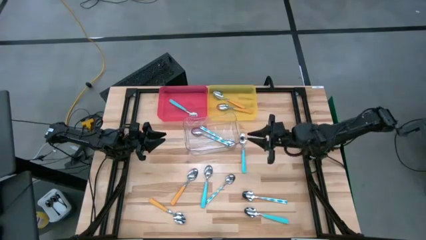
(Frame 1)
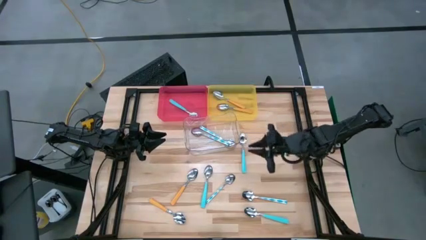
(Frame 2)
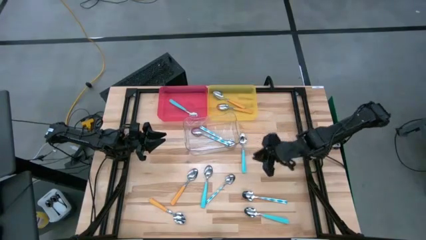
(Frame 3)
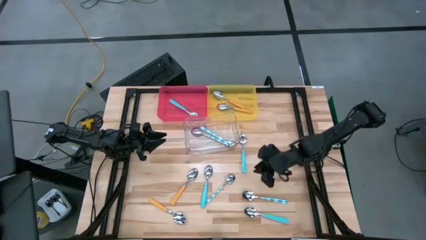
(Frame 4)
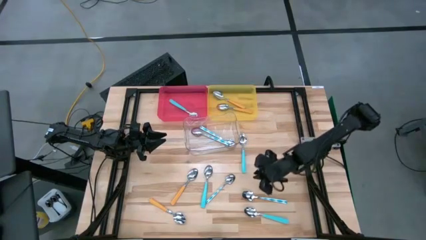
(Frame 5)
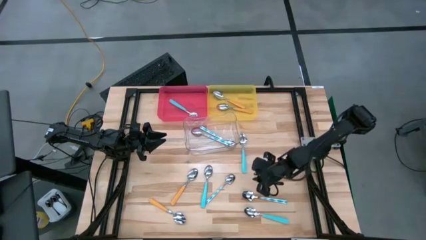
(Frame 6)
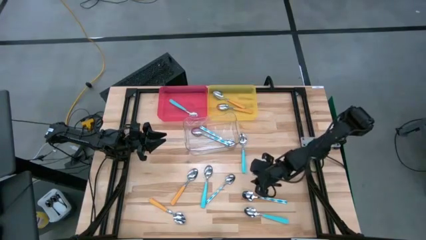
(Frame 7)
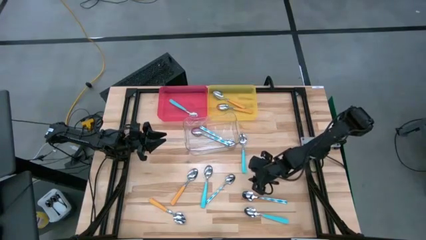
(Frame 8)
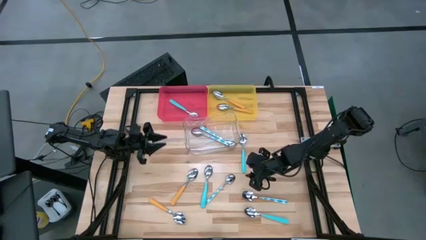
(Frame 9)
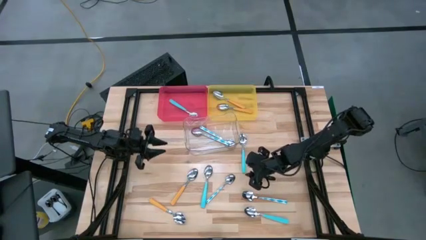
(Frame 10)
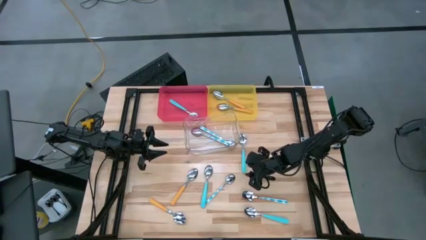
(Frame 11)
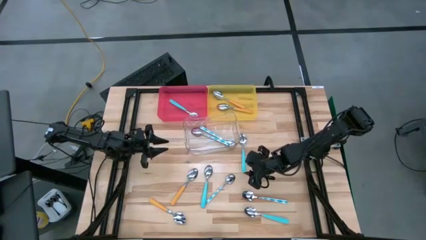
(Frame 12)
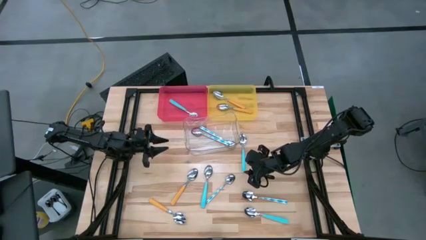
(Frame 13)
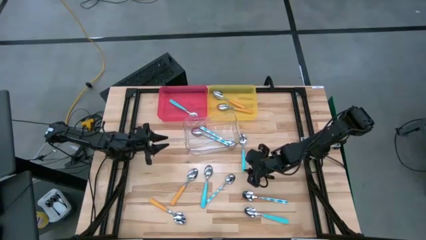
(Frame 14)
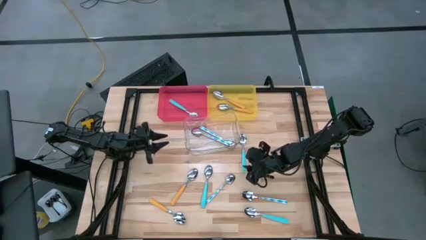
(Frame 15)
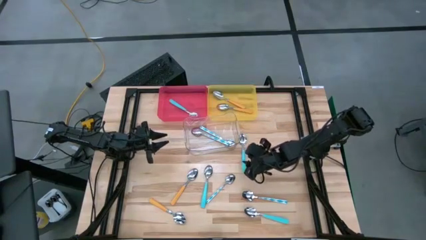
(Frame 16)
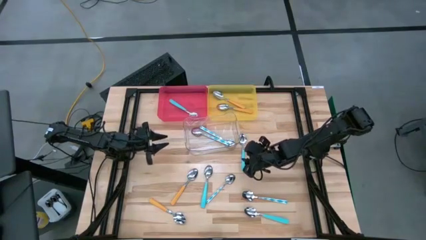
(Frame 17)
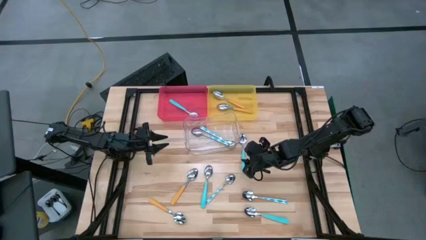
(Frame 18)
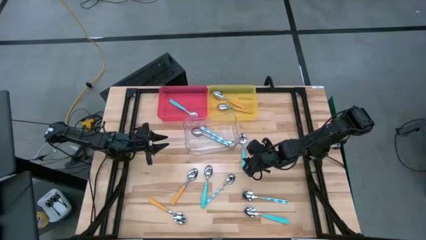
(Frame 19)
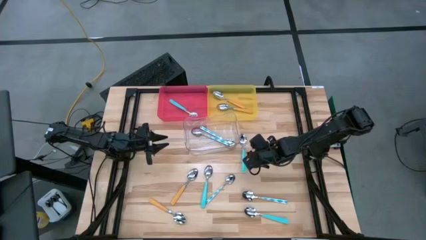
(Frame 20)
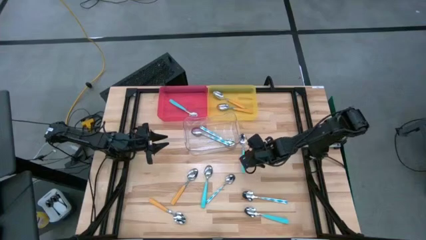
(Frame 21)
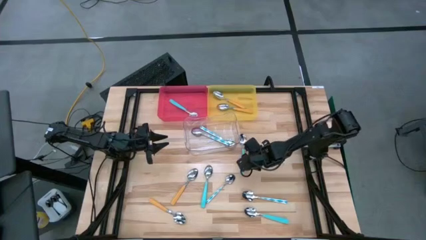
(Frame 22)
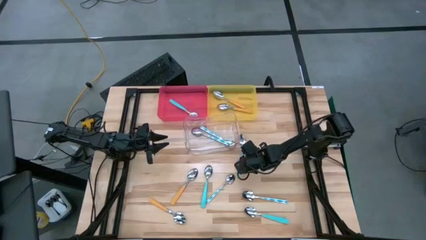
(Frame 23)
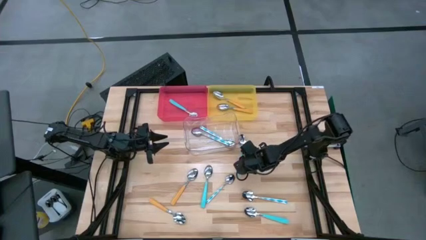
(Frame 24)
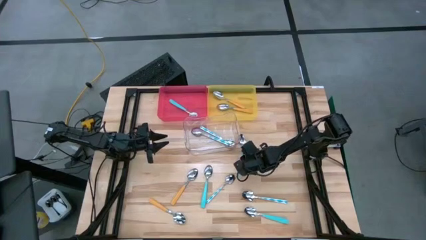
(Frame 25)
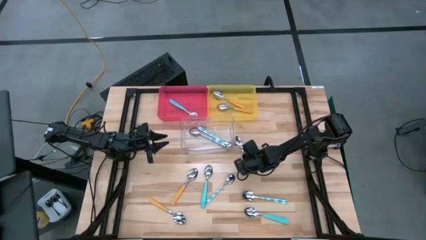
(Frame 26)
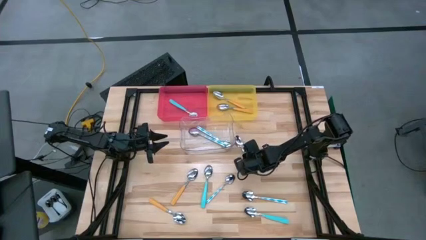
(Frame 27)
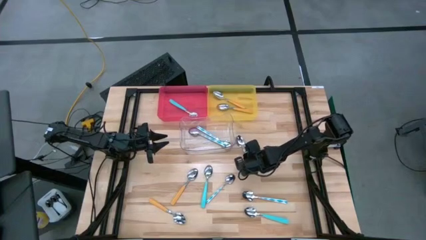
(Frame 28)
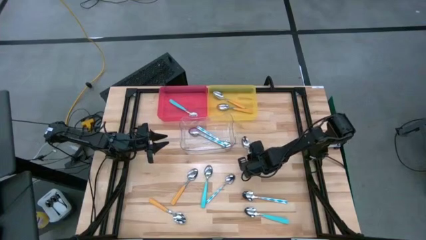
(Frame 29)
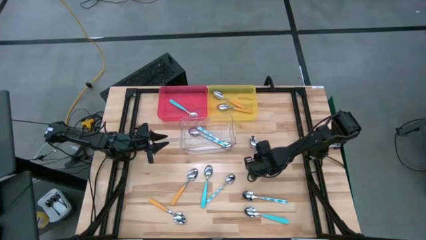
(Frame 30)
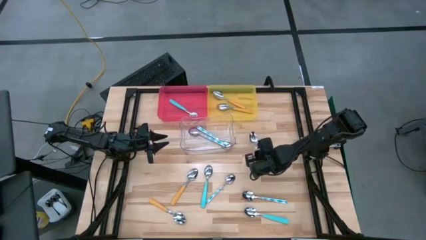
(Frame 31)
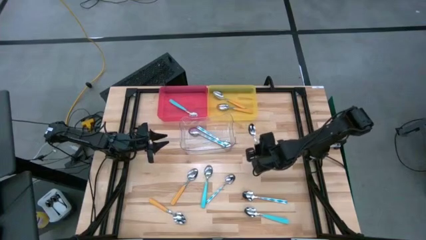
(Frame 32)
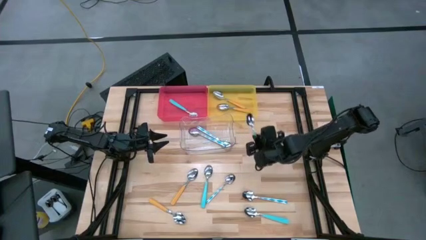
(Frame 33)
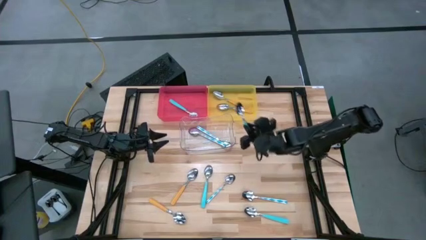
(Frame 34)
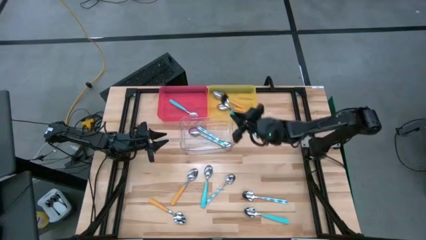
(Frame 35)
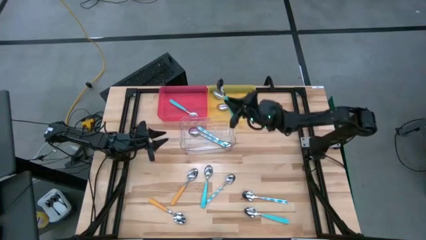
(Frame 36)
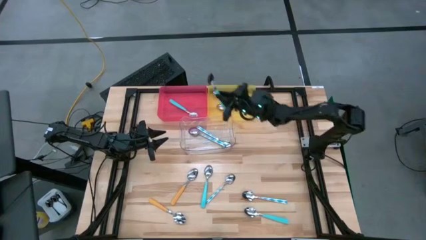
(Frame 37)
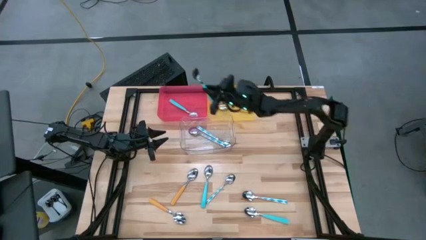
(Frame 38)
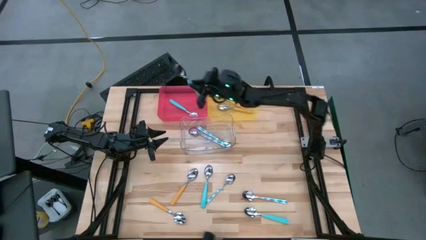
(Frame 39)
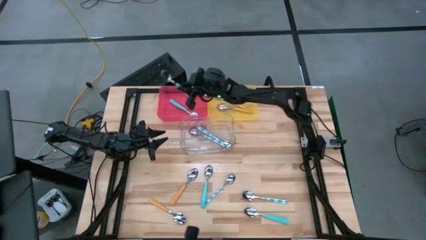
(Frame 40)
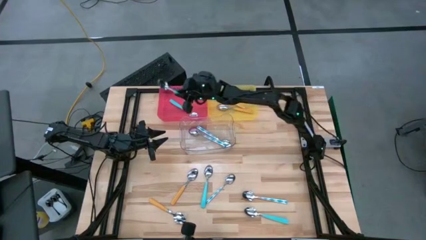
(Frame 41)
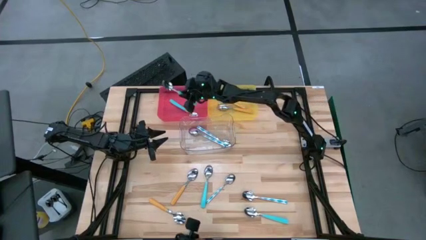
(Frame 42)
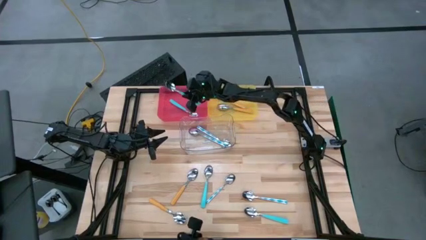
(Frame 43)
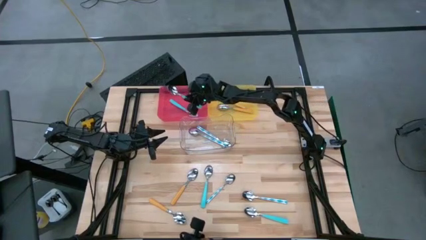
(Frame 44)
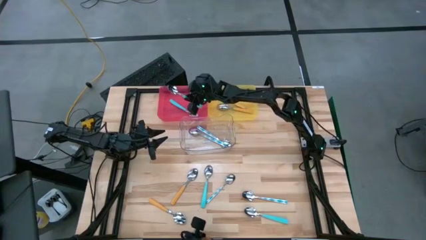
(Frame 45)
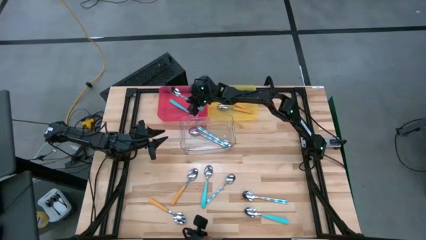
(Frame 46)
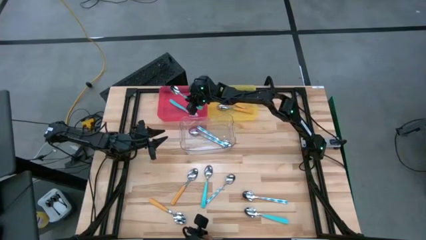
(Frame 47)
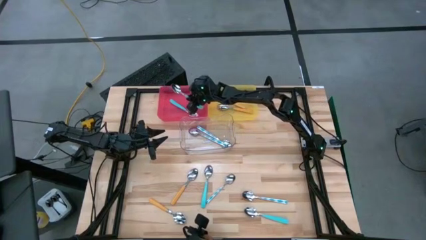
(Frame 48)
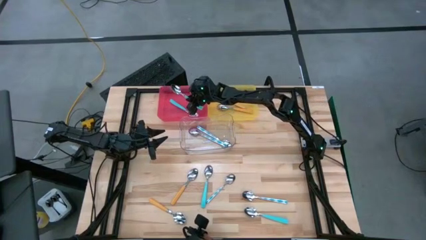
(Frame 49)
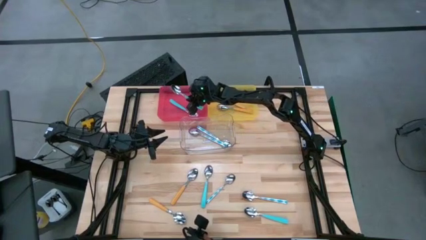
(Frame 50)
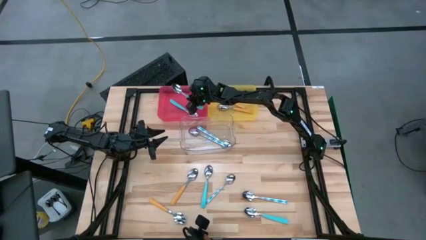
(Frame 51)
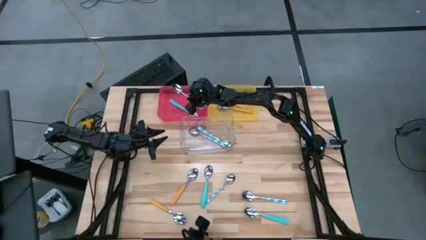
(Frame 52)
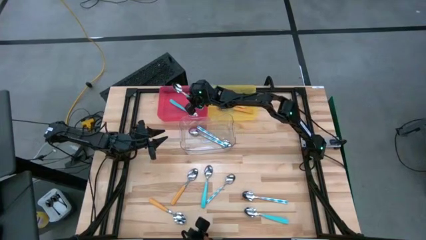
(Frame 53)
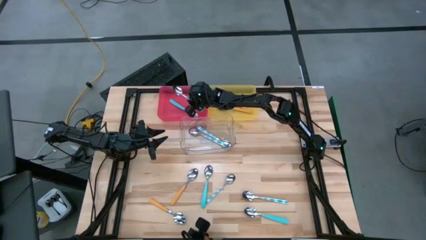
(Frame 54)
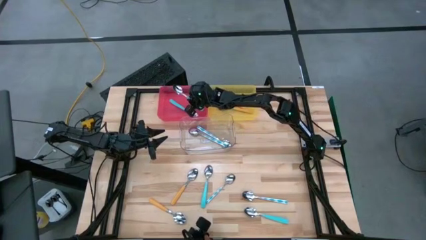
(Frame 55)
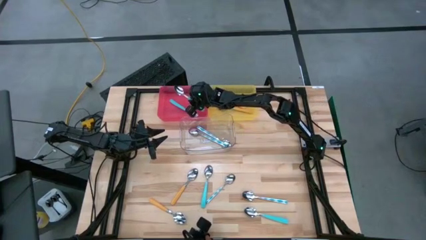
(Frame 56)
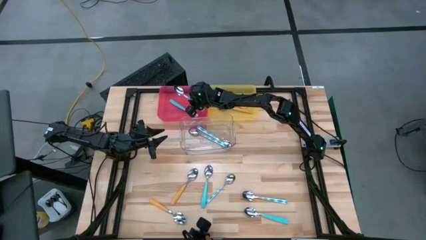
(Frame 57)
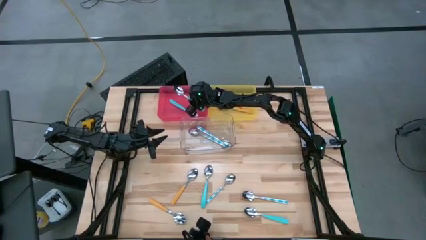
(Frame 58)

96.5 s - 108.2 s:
Task: Sort silverware by color (type)
Put the light green spoon into the red bin
